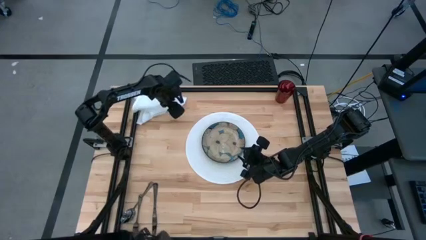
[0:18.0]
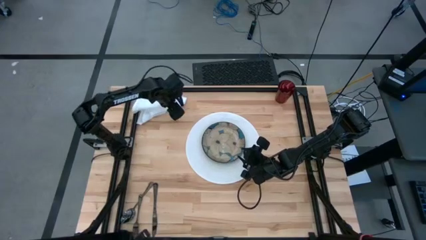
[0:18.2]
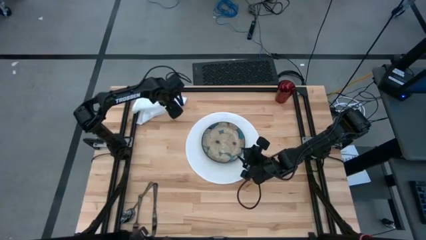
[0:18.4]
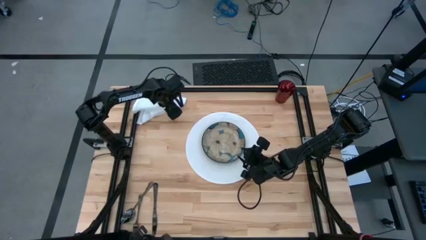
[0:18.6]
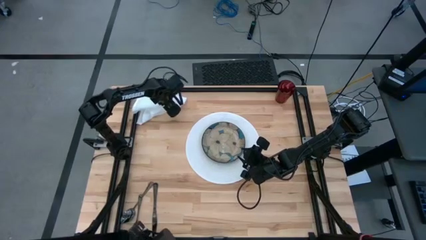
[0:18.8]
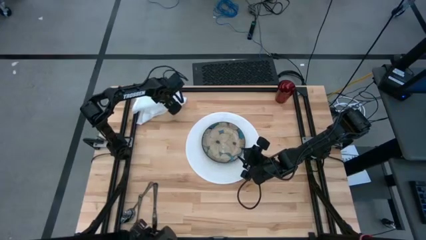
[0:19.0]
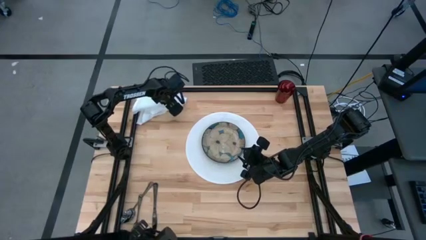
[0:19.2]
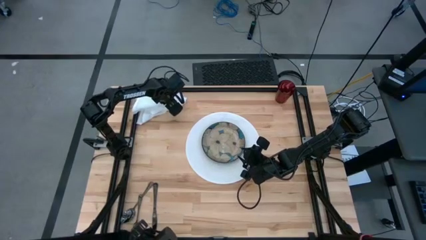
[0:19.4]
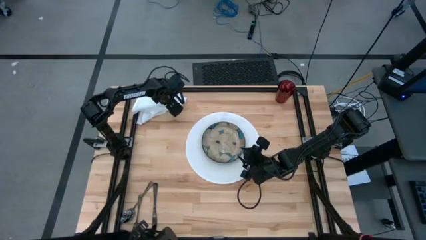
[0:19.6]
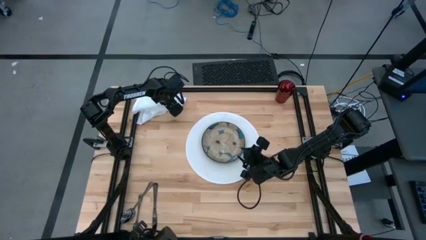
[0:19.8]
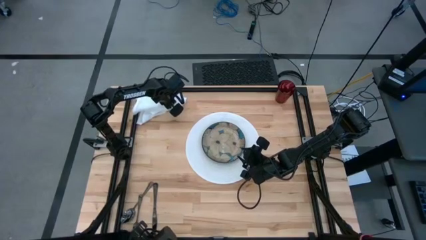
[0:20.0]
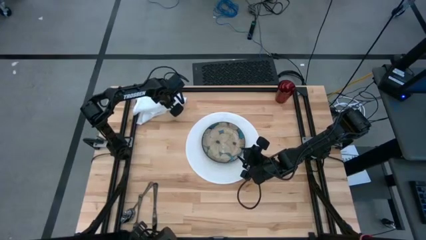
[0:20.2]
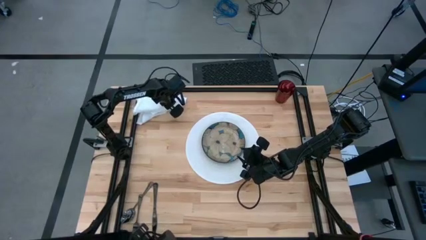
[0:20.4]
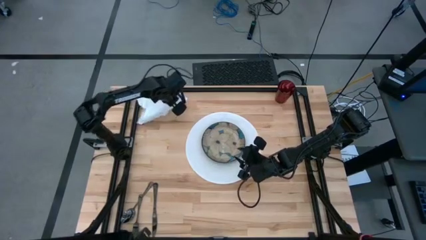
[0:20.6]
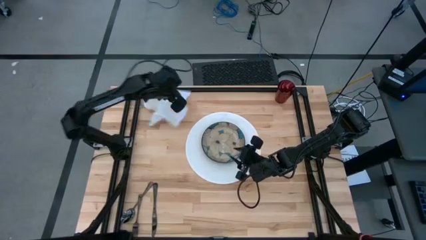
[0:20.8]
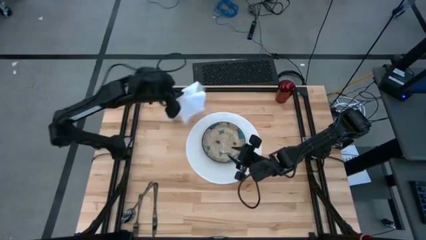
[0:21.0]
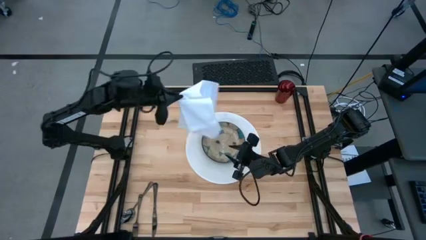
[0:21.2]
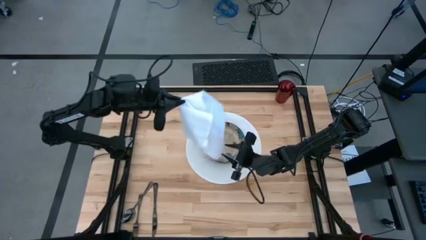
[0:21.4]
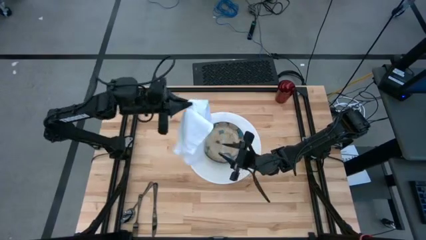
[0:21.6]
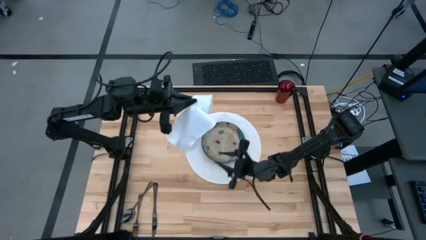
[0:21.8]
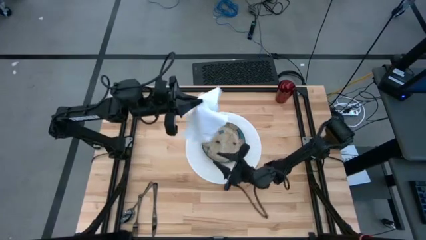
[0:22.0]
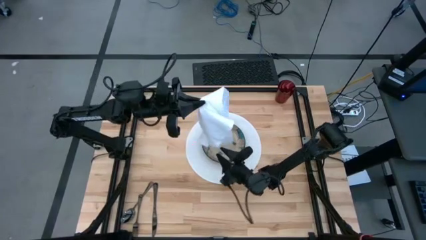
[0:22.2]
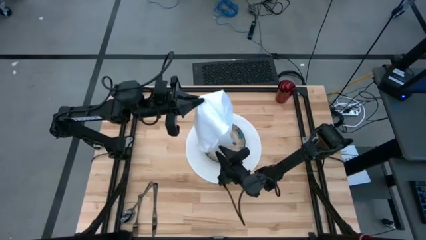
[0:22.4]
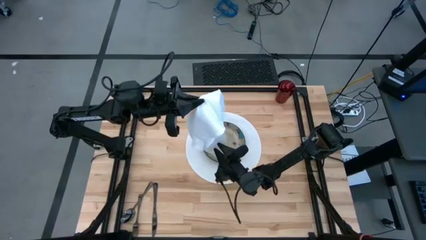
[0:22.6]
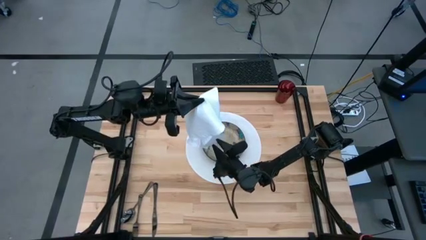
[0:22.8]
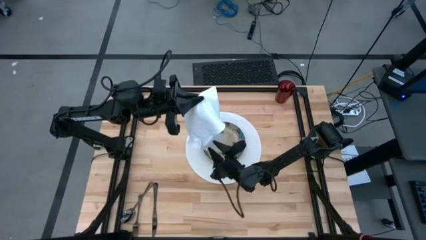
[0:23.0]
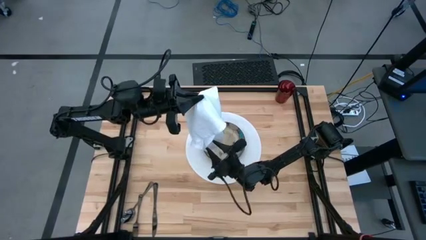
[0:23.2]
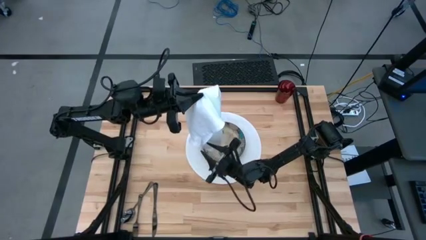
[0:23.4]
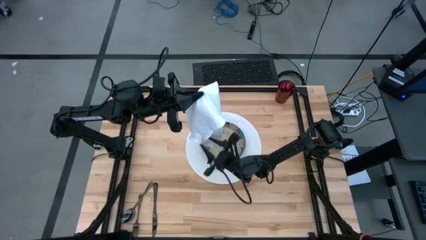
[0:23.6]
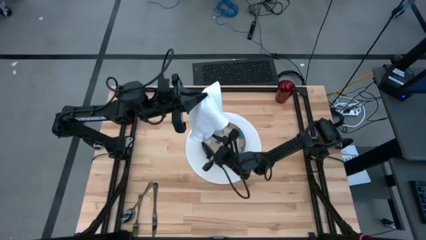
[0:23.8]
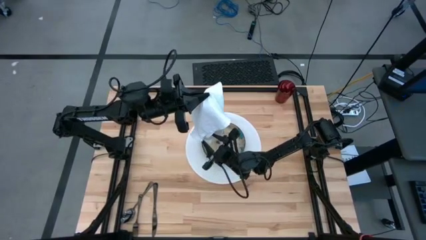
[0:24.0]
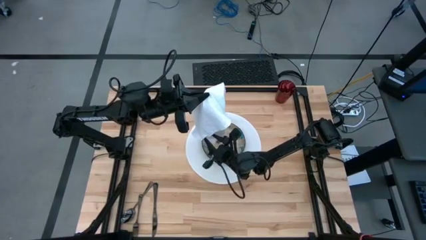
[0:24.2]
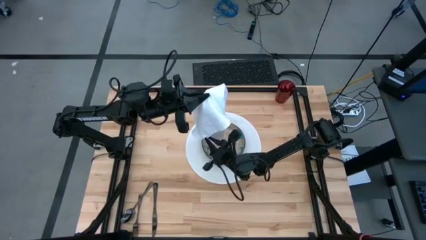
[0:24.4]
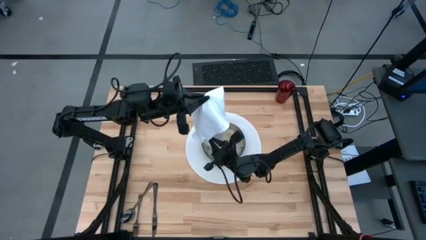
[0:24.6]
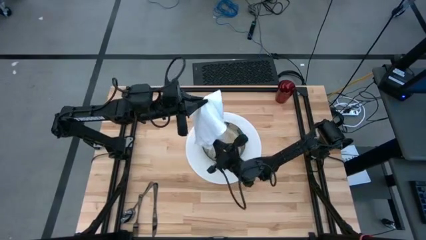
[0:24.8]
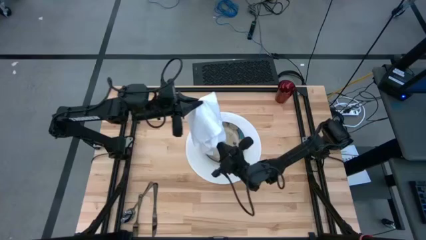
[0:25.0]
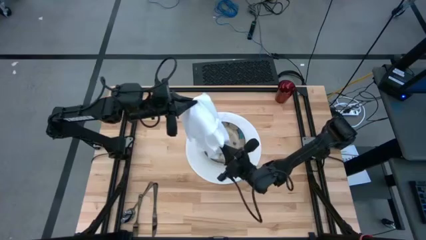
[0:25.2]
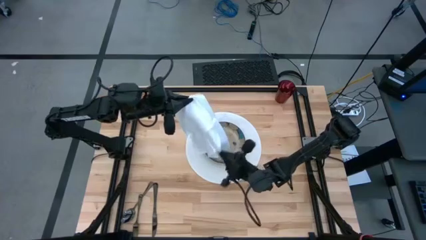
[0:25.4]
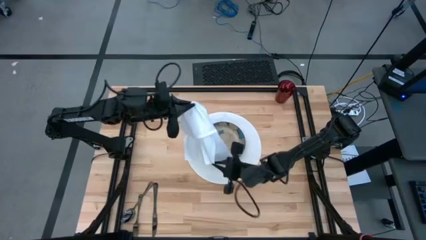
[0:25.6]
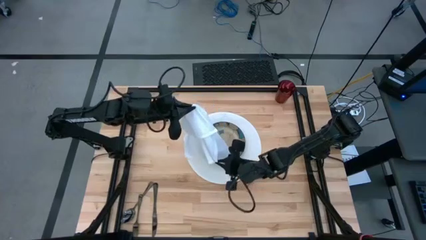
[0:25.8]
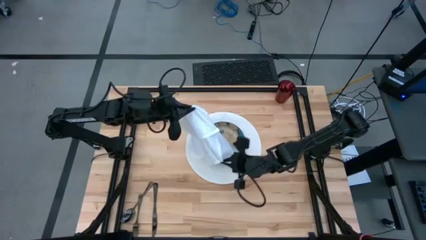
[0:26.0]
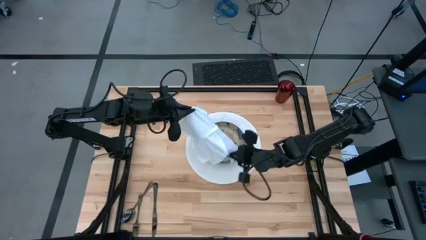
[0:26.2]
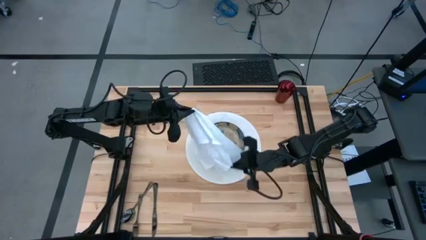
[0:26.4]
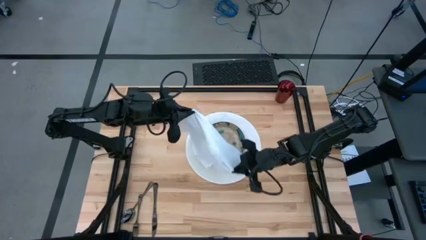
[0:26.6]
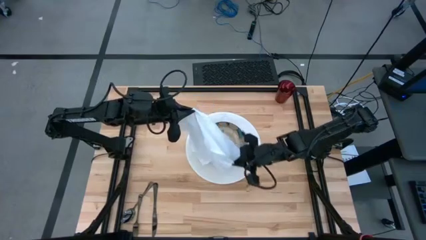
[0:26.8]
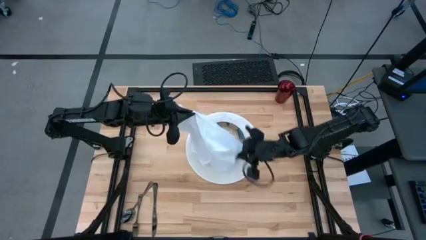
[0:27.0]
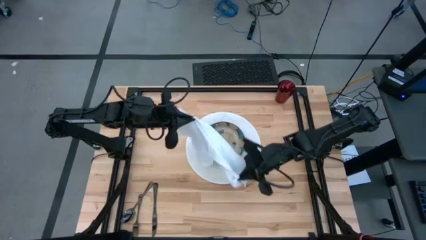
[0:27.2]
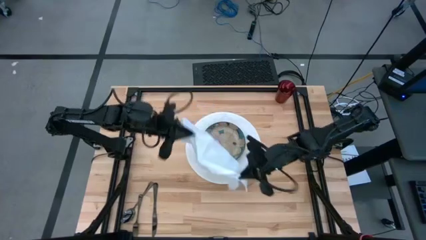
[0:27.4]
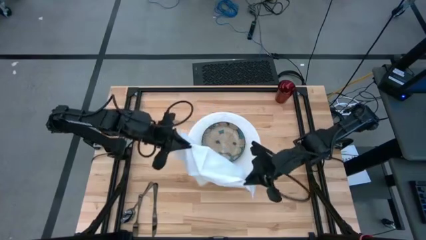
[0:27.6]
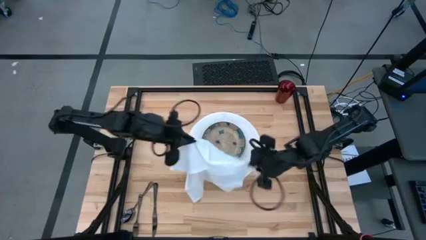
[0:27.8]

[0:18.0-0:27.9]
Task: Set table place
Fold the white napkin

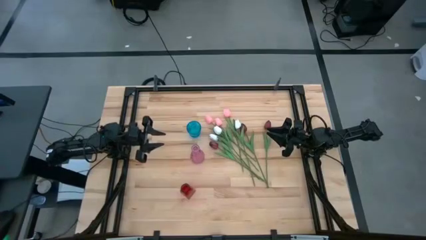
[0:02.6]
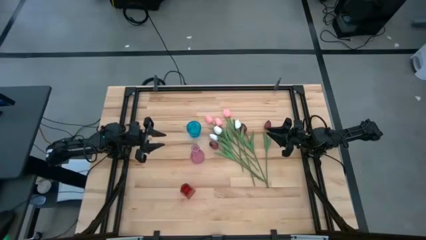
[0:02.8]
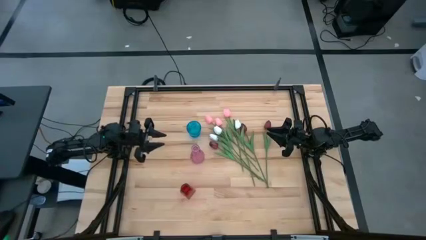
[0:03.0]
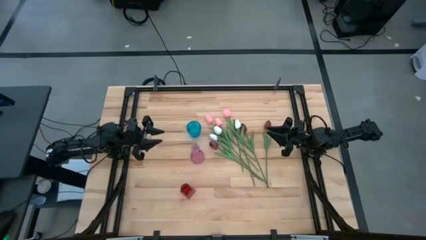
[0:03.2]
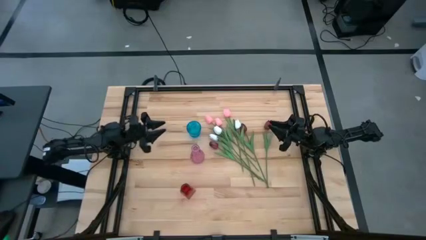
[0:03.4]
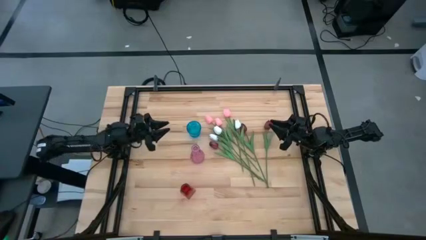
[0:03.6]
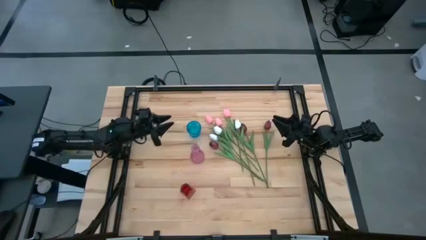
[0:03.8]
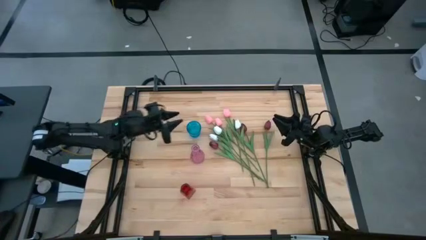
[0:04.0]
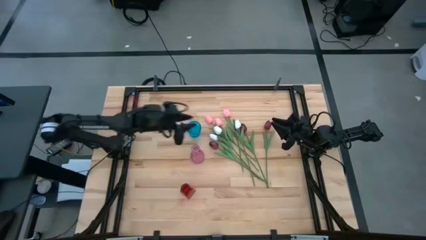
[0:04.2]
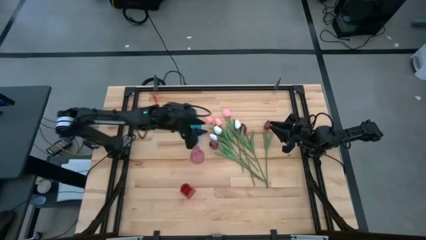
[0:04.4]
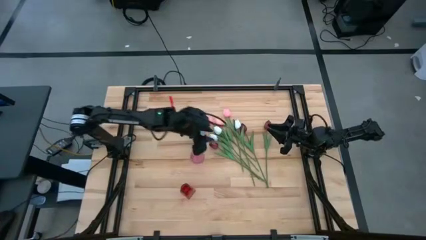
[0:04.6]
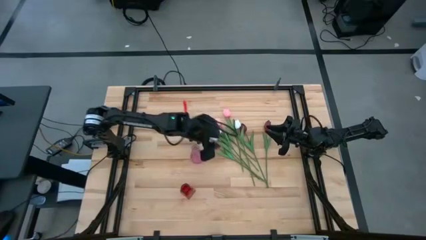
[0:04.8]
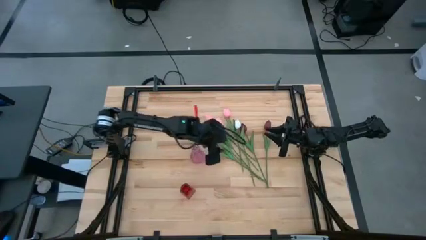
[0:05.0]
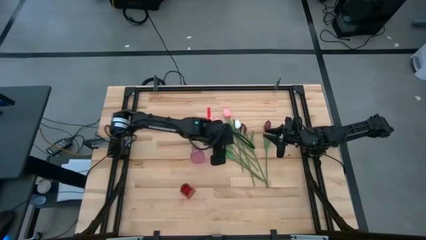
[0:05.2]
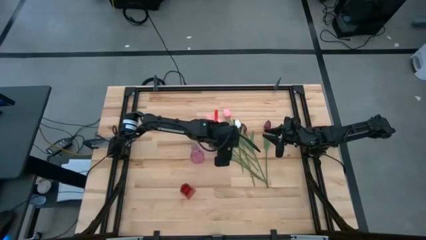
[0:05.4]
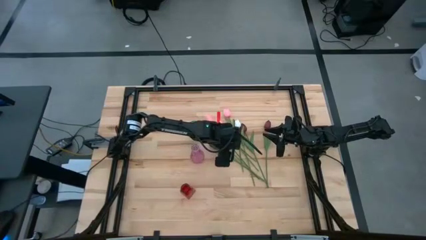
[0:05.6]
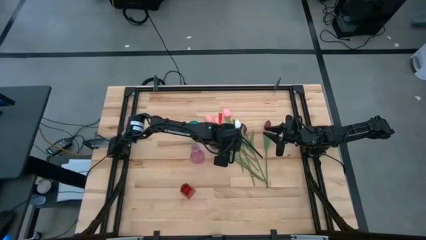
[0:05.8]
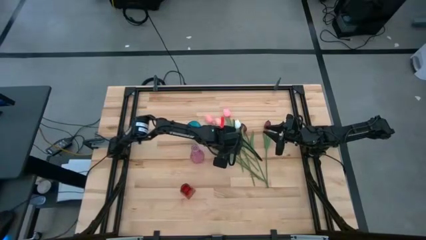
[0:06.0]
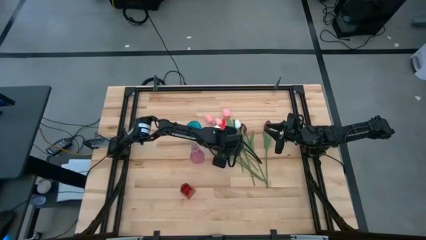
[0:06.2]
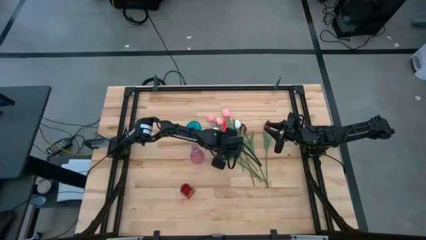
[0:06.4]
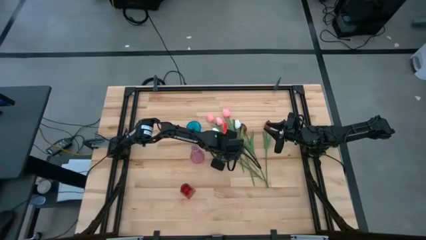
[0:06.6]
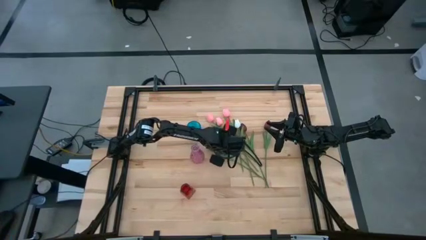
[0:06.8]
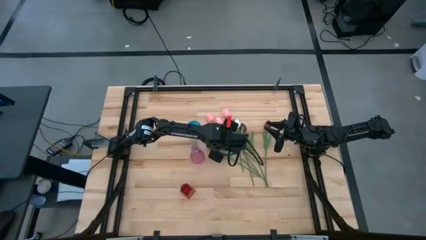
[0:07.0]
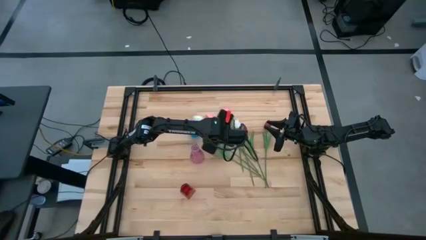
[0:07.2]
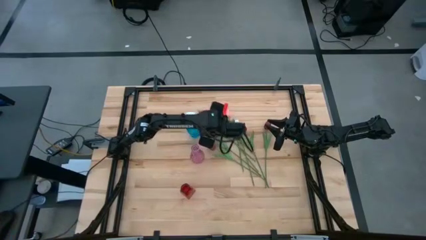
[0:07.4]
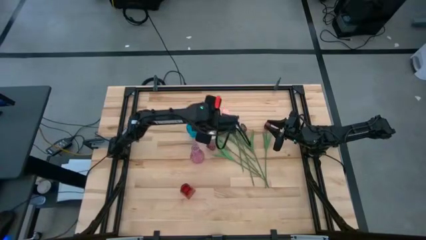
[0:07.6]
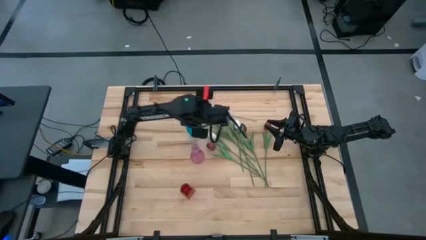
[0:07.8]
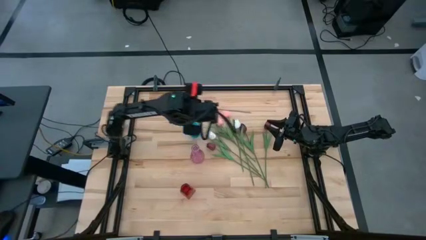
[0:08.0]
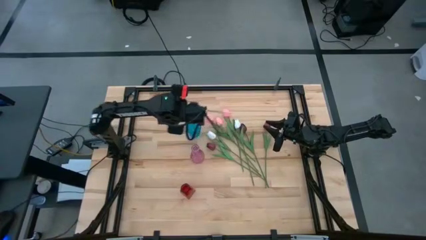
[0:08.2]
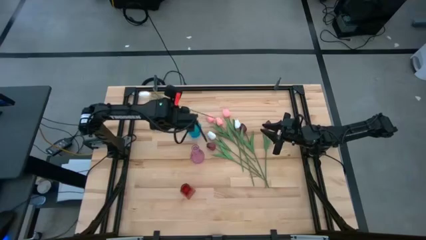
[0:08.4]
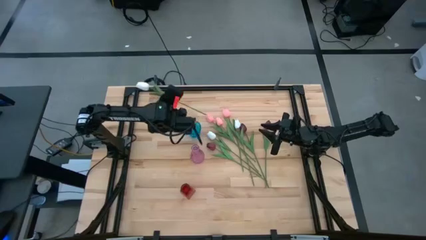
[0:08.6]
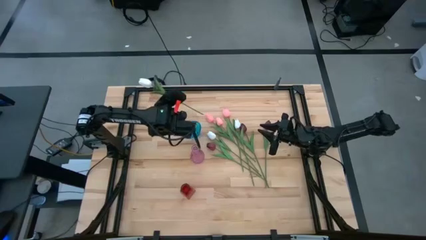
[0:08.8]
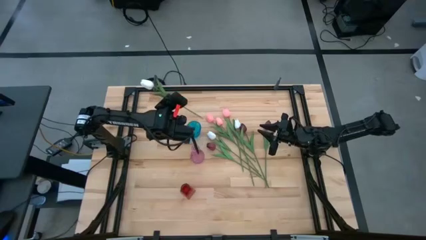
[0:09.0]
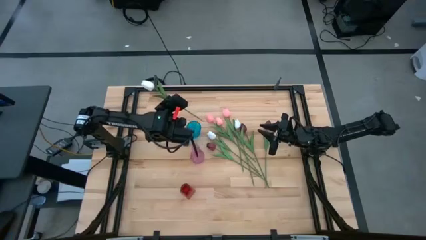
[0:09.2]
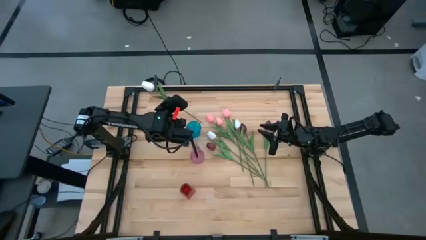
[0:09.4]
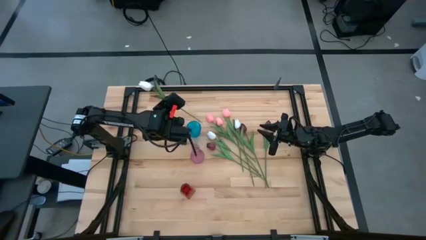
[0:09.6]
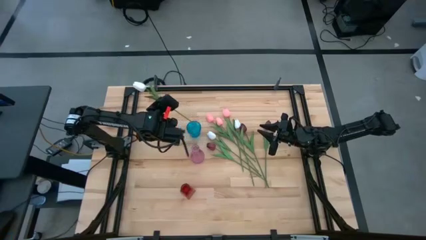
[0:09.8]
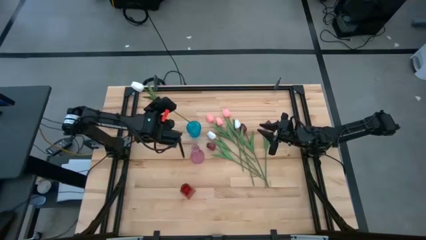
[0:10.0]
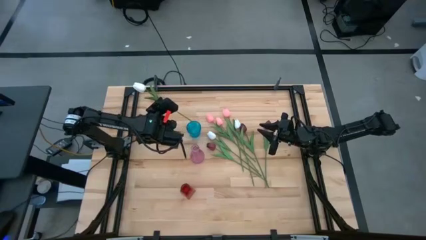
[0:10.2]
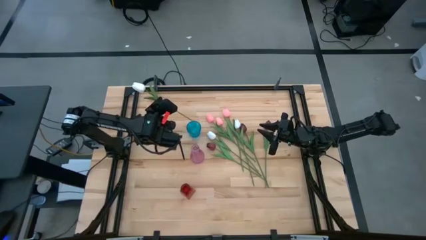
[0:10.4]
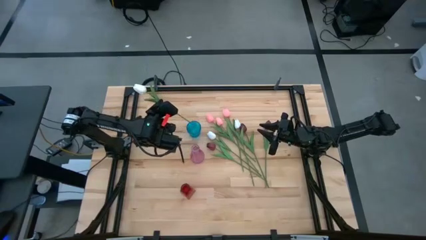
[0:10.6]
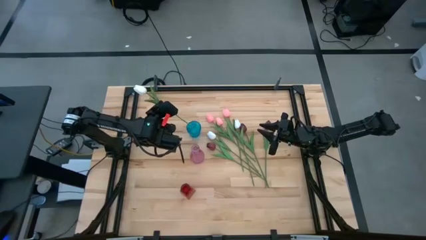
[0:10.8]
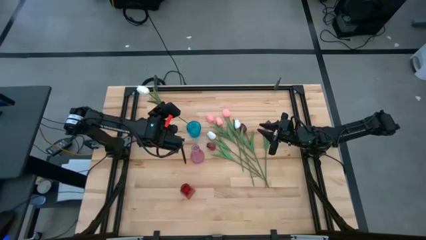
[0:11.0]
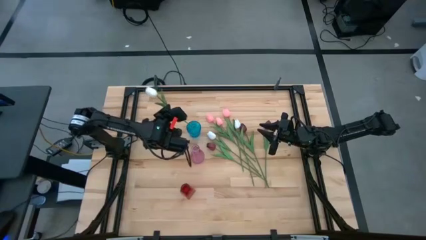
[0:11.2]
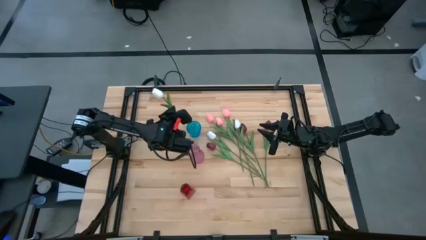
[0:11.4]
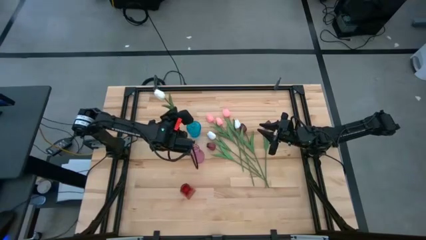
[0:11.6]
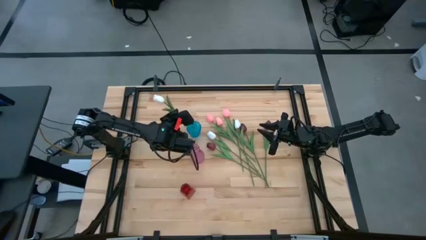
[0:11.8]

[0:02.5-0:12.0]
Task: Sort flowers into vase by color
Put the middle white tulip into the blue vase
